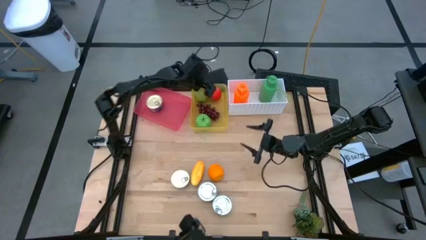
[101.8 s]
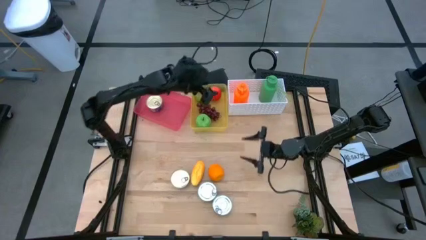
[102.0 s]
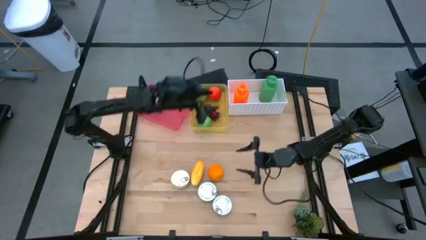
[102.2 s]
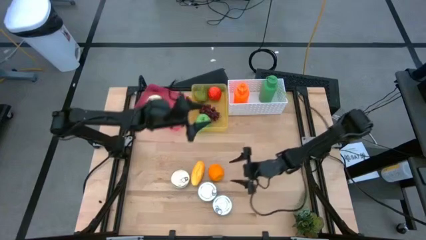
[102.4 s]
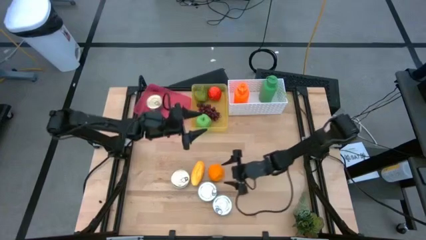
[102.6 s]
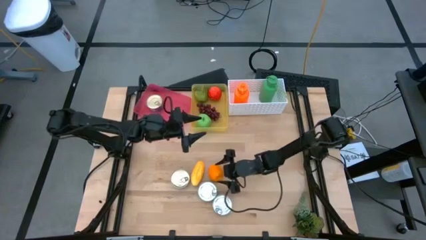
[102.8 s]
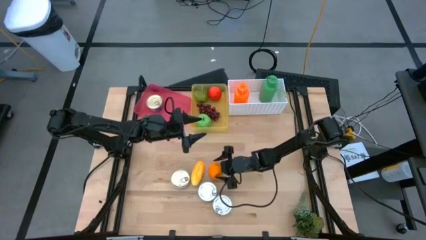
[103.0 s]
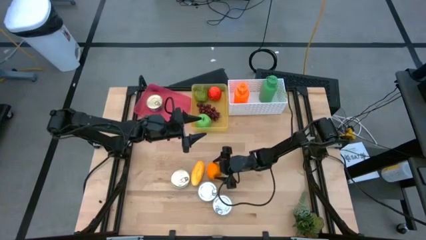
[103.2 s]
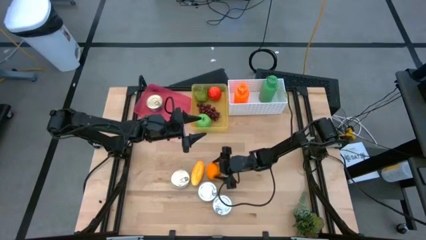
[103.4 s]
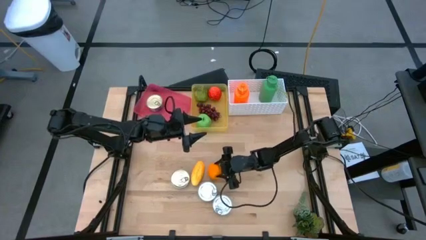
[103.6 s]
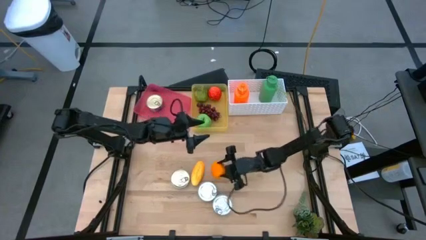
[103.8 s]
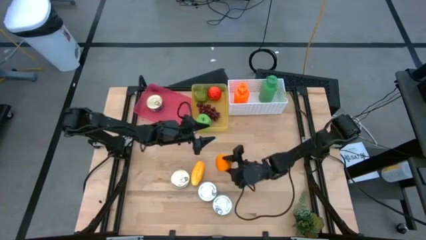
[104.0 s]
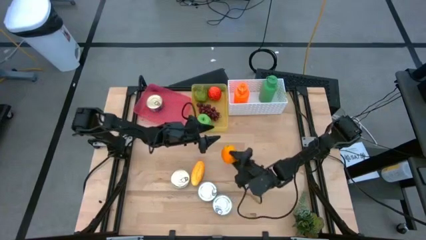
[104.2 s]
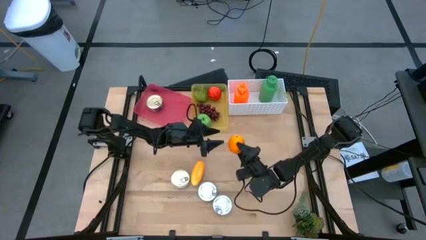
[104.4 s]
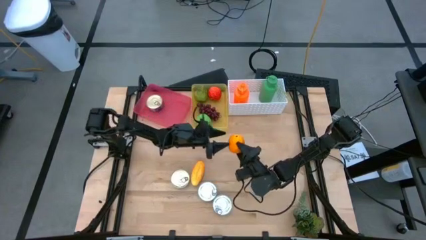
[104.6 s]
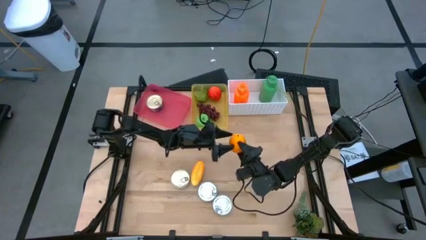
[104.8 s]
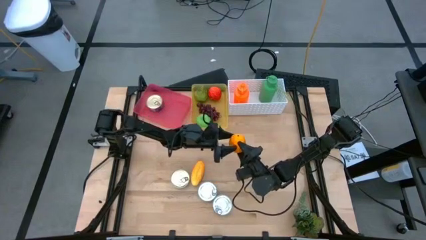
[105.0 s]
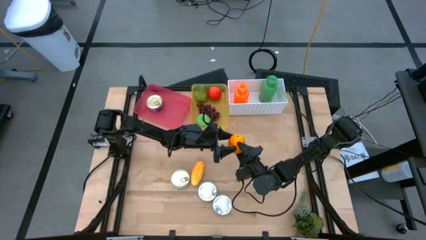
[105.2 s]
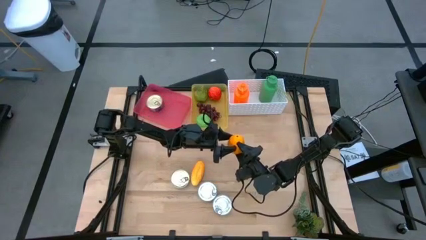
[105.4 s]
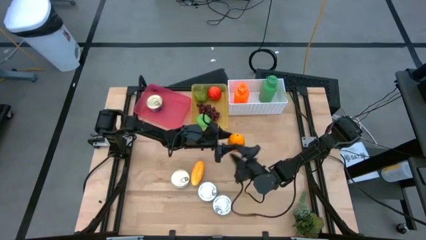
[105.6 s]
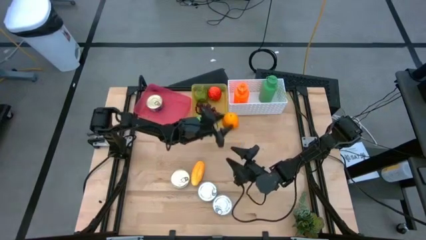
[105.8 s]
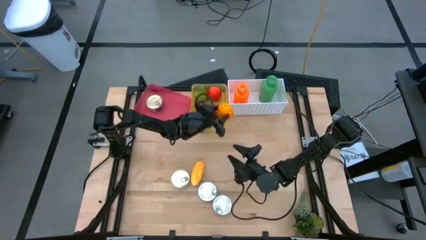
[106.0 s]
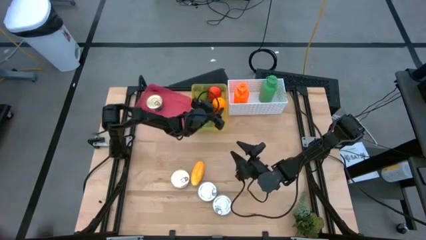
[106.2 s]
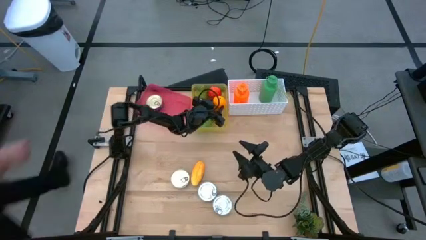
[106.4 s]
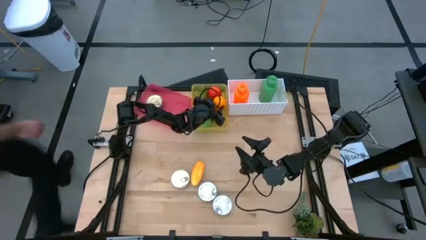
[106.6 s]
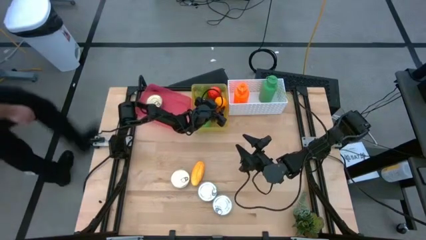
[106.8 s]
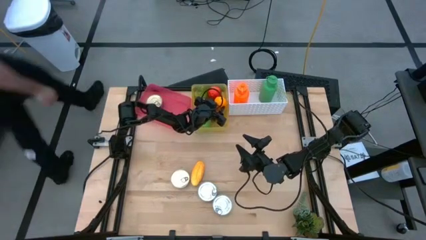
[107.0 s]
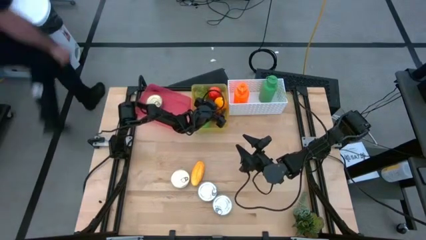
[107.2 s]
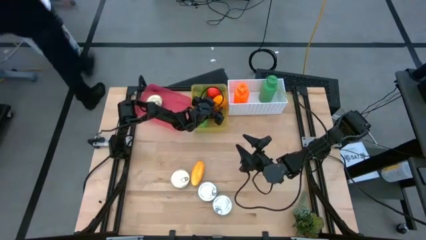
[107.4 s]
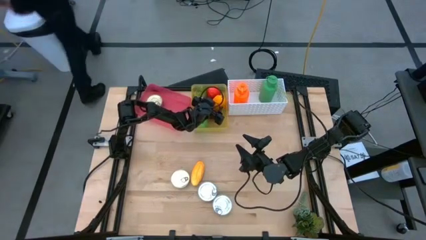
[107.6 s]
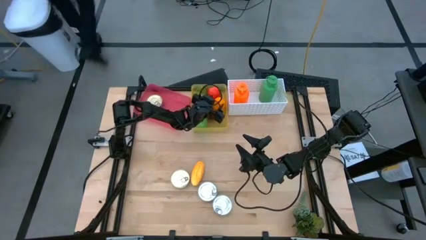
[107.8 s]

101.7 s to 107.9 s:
Task: Pick & Place Food Item
Put the orange into the yellow bin

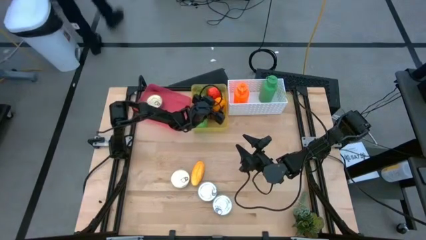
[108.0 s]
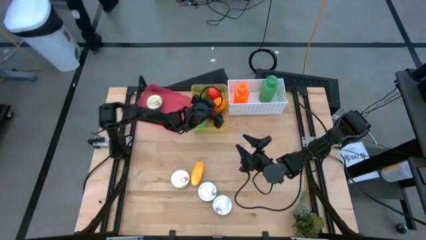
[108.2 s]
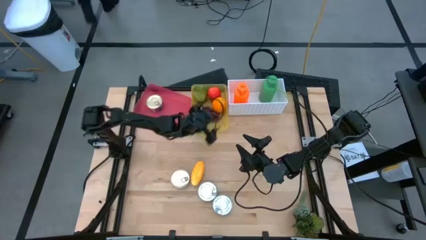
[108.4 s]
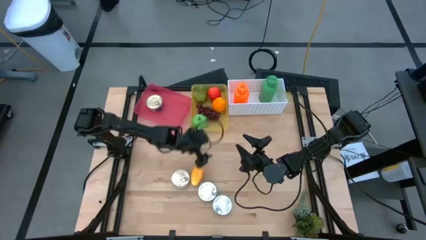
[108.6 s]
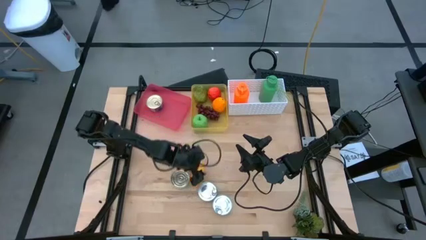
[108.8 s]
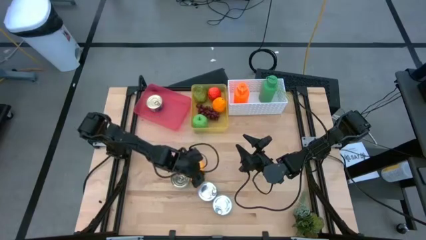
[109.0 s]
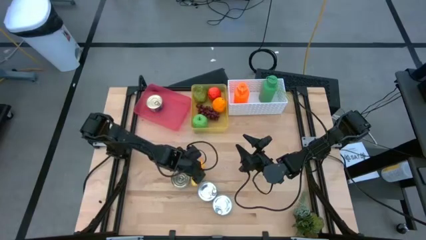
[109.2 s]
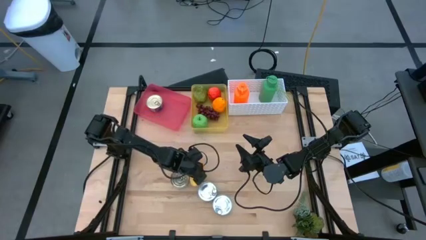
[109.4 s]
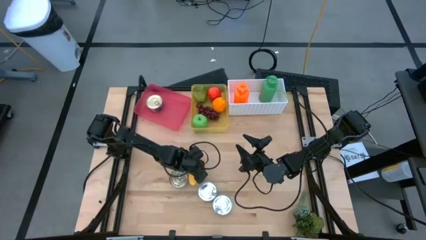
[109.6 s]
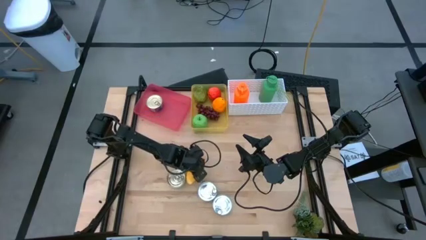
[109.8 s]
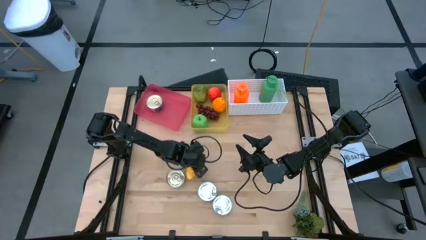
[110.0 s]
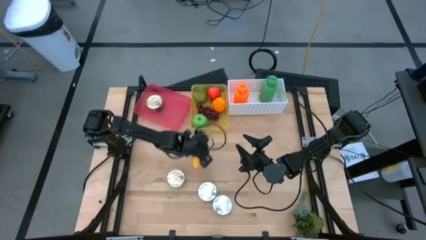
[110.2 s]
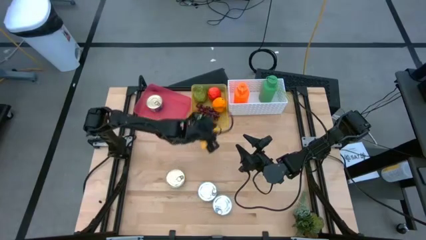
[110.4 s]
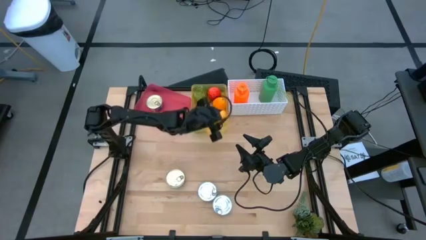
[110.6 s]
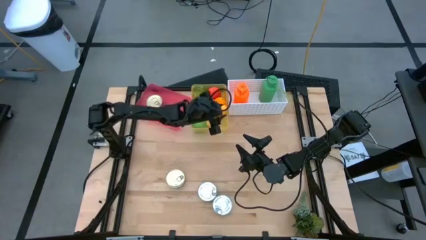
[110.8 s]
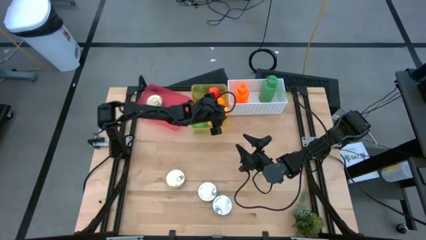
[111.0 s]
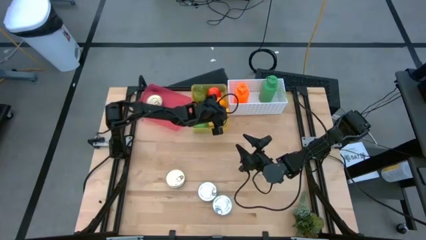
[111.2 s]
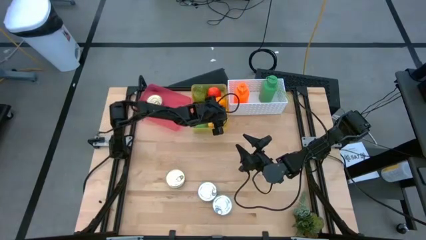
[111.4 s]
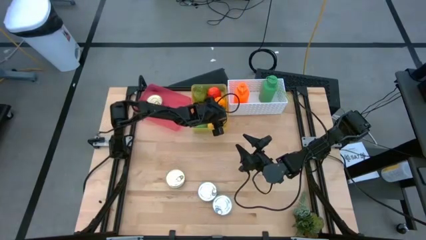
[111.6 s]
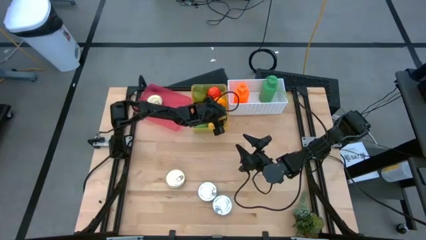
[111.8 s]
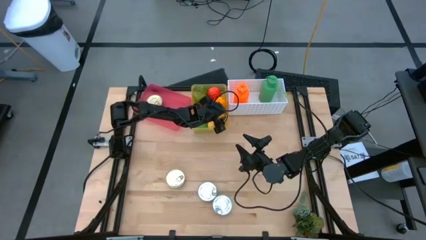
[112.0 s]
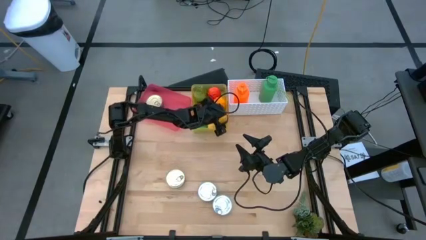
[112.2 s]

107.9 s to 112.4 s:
Put the yellow mango into the yellow bin

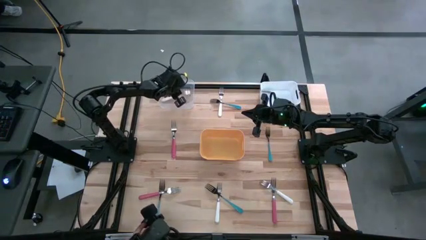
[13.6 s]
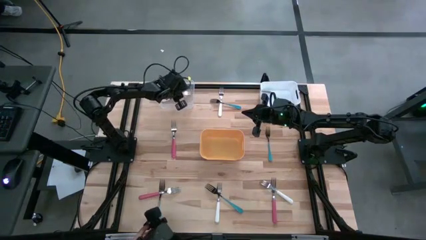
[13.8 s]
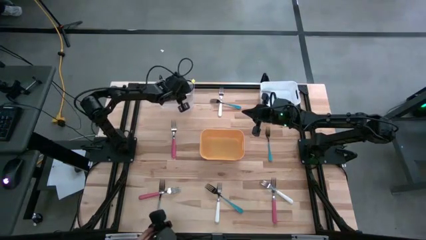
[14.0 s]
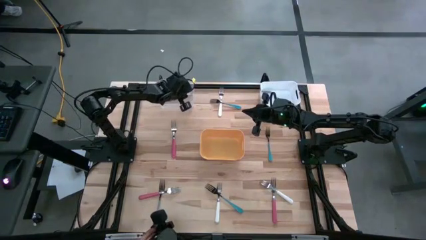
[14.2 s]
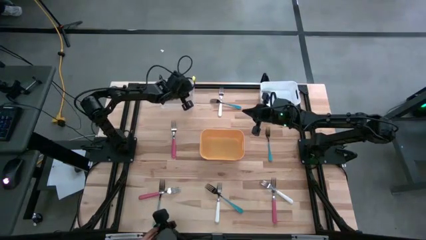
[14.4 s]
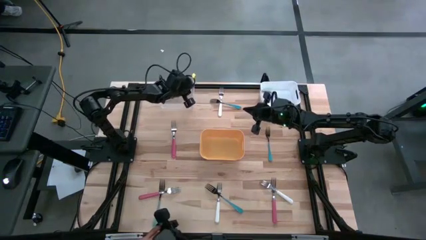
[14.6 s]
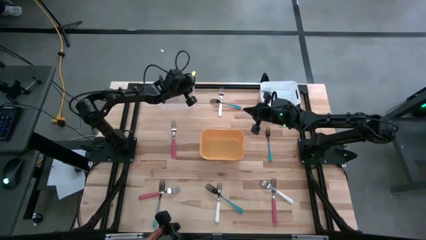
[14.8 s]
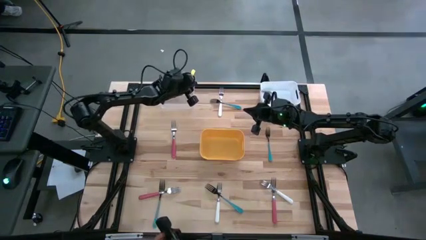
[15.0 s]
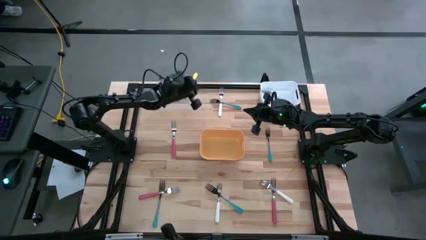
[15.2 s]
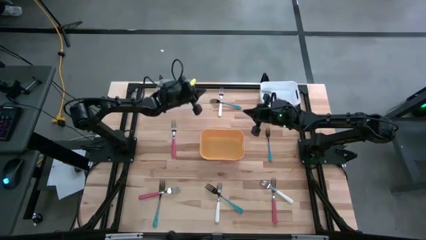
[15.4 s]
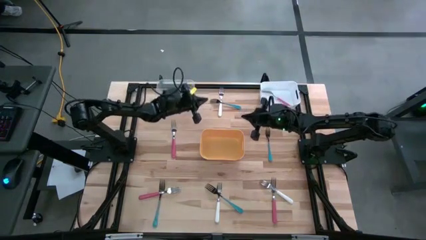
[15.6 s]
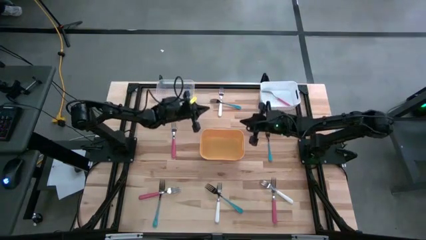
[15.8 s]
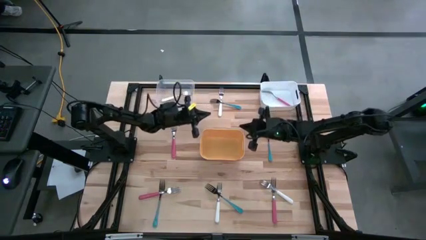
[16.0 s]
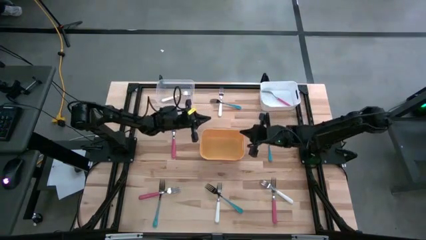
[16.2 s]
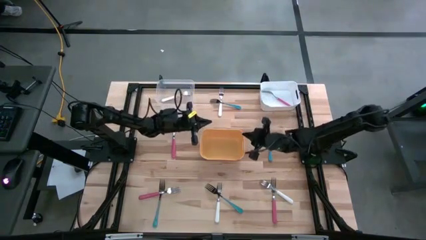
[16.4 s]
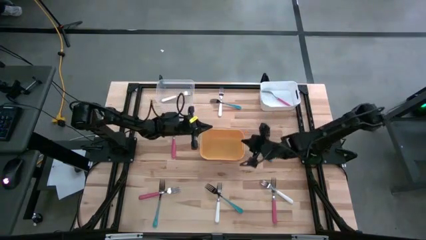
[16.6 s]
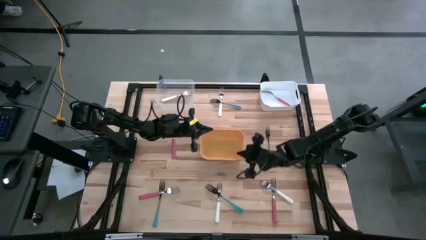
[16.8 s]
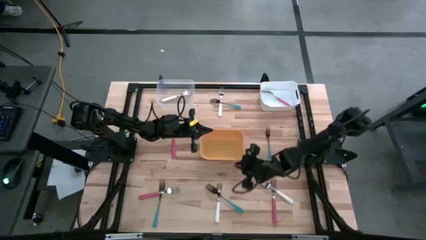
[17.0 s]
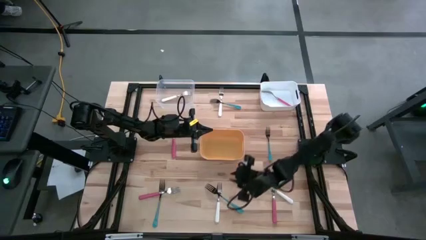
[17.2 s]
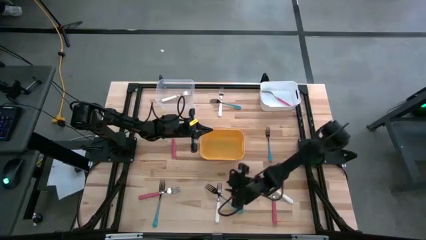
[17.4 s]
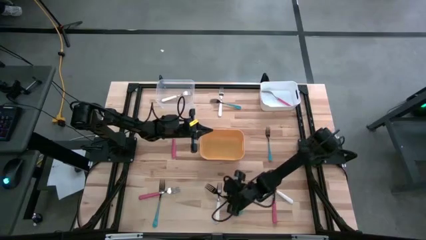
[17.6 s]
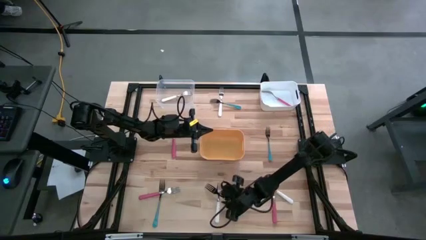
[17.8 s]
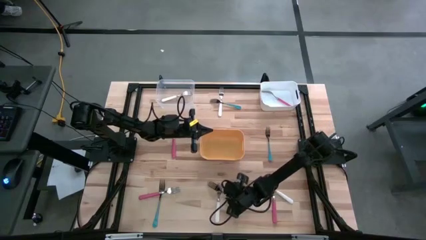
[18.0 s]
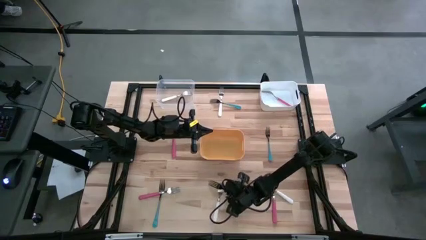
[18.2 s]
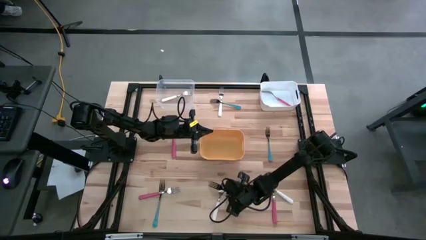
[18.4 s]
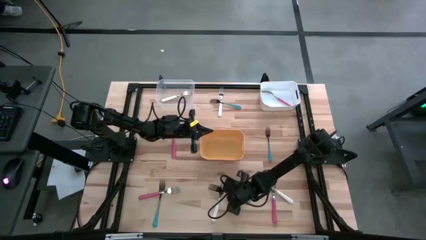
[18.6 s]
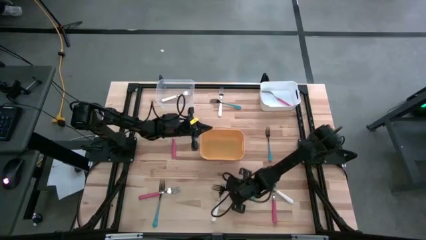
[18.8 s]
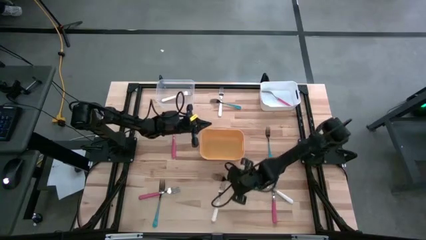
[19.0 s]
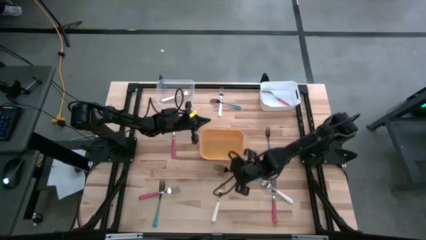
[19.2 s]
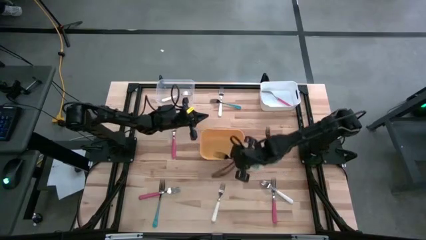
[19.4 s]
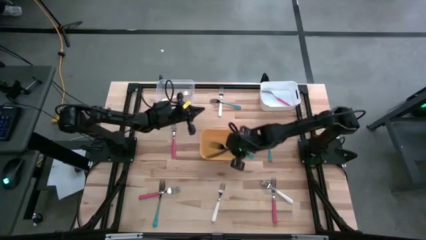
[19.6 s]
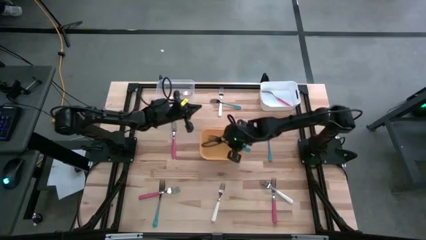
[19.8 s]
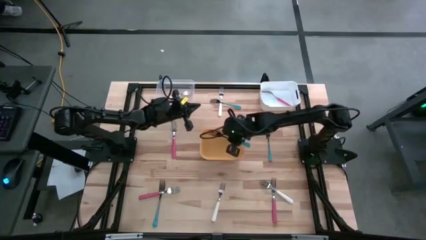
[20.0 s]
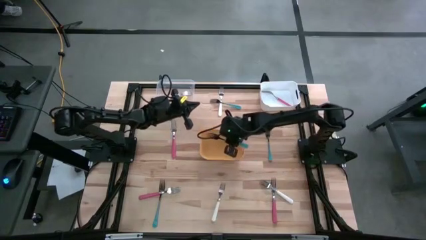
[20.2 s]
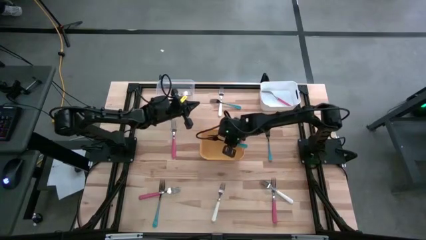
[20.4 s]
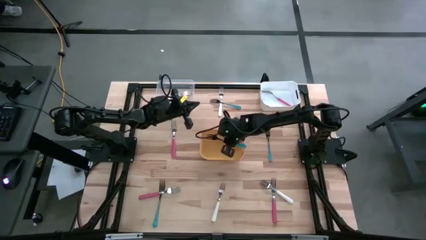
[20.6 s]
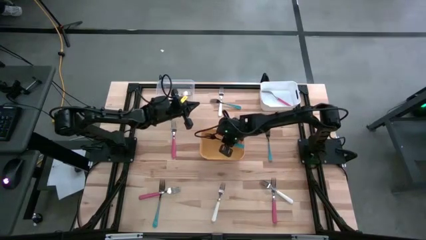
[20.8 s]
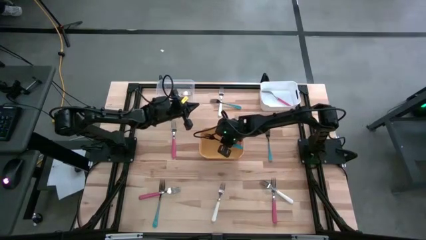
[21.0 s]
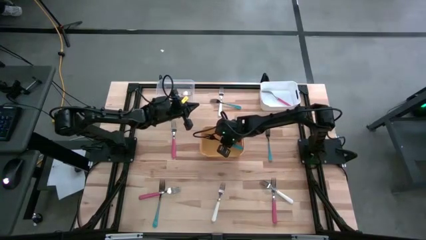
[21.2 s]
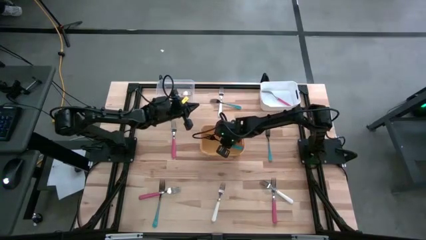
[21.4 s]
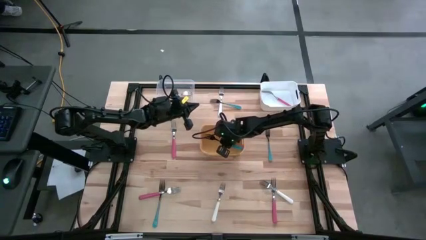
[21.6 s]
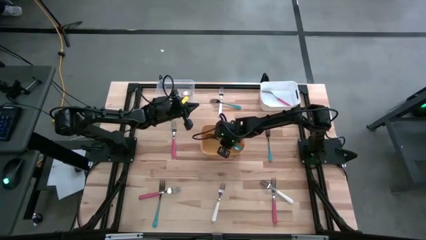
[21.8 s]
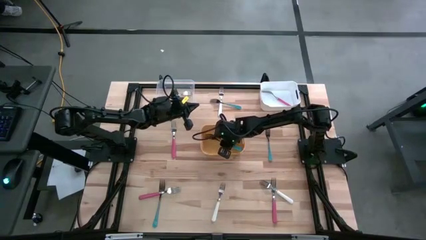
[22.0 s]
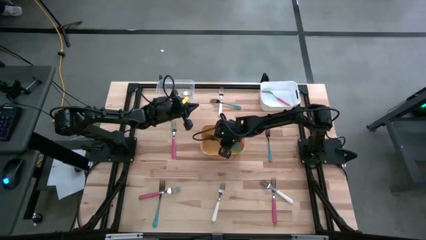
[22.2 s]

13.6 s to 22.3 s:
Task: Sort silverware by color (type)
Put the blue fork into the yellow bin
